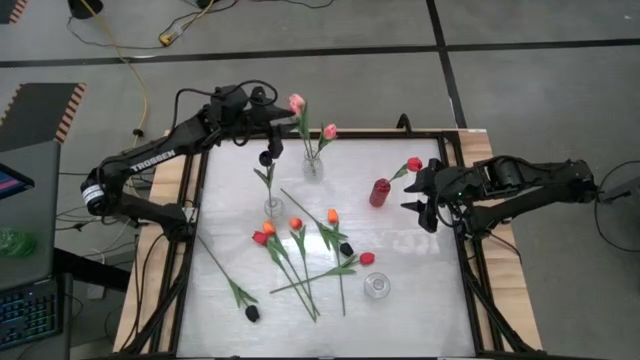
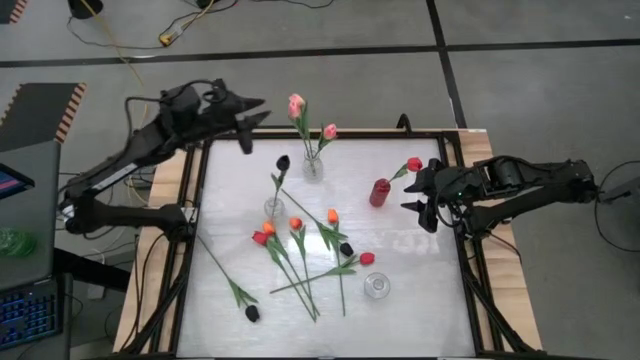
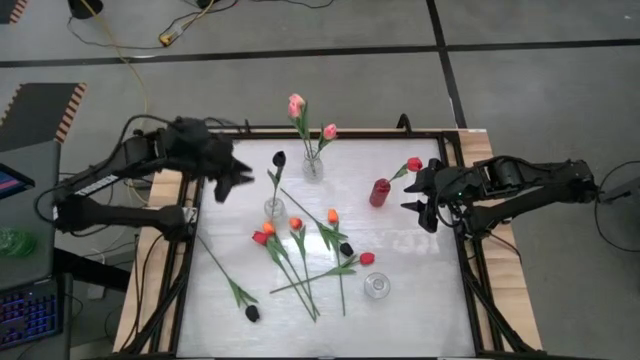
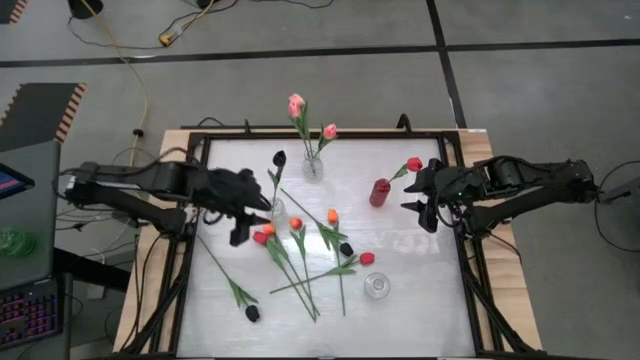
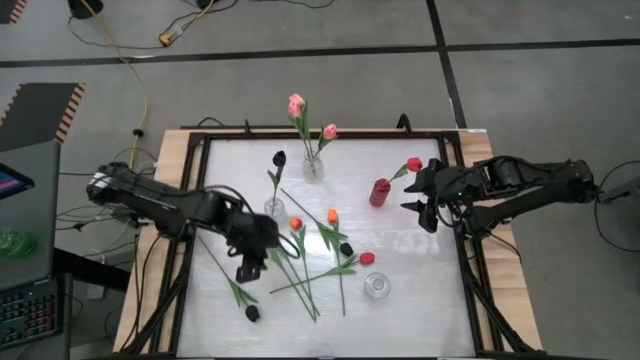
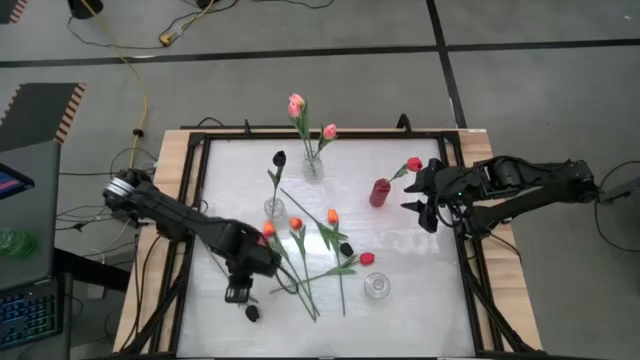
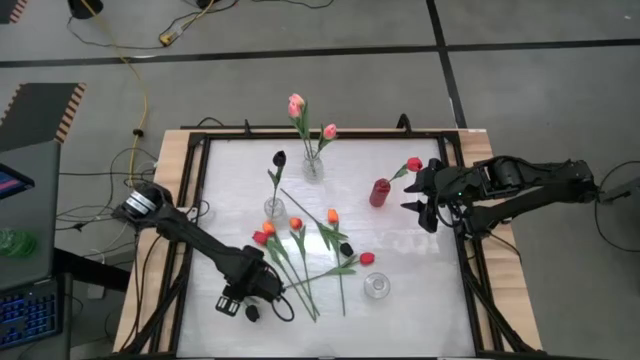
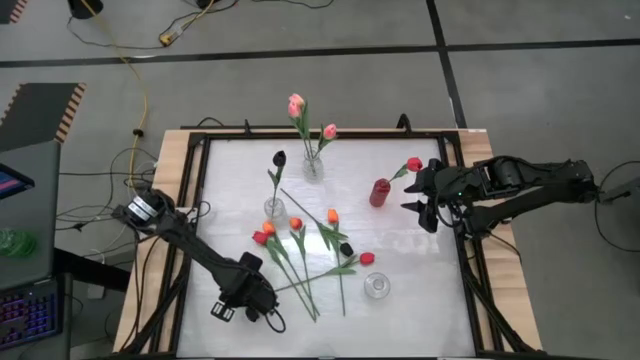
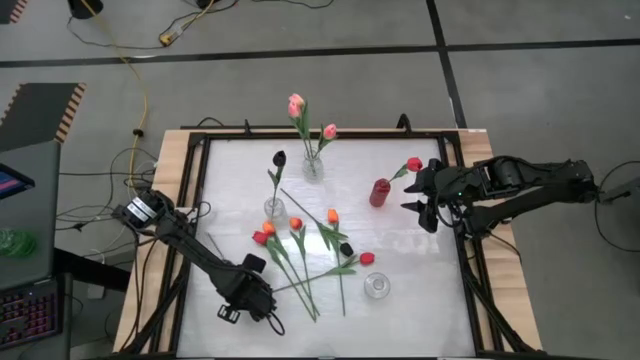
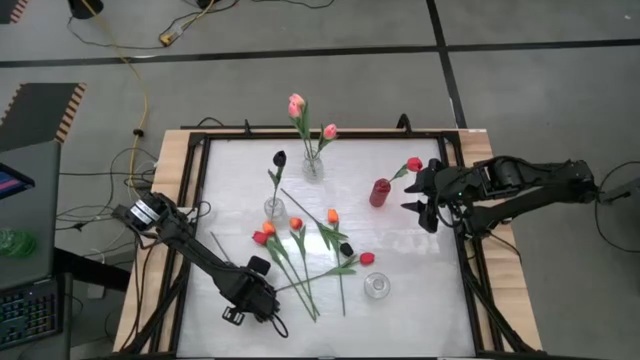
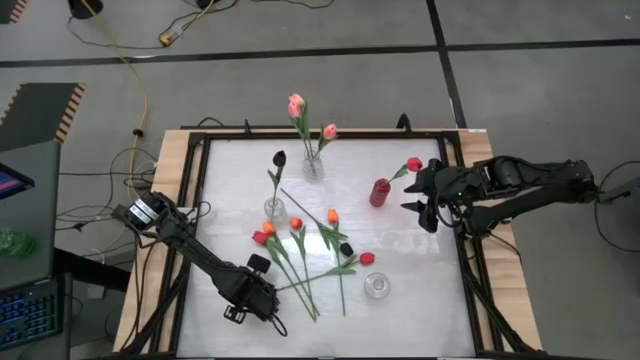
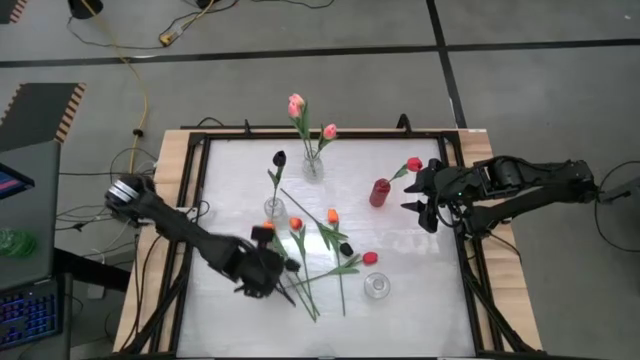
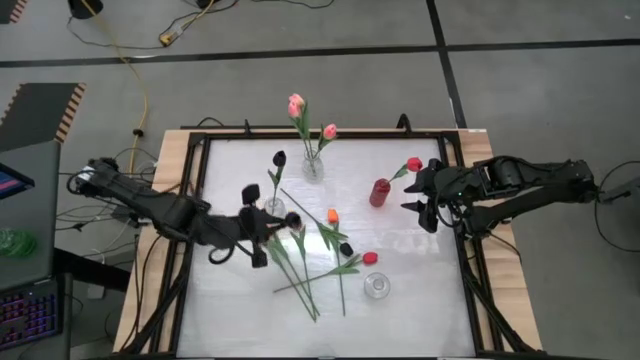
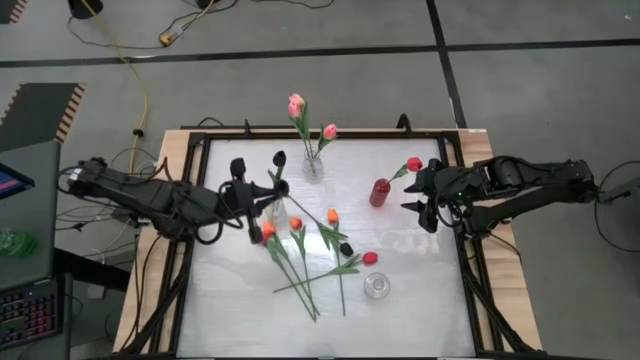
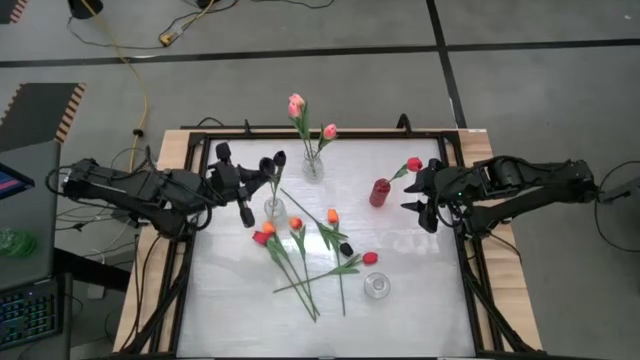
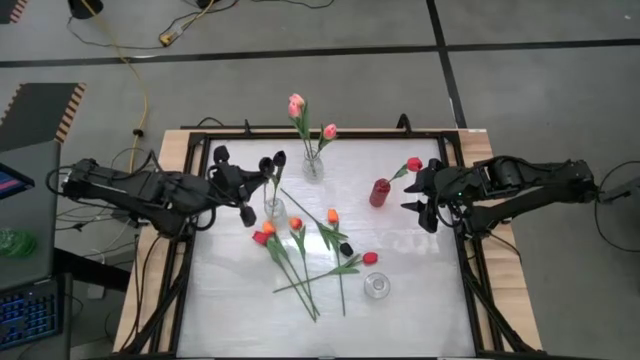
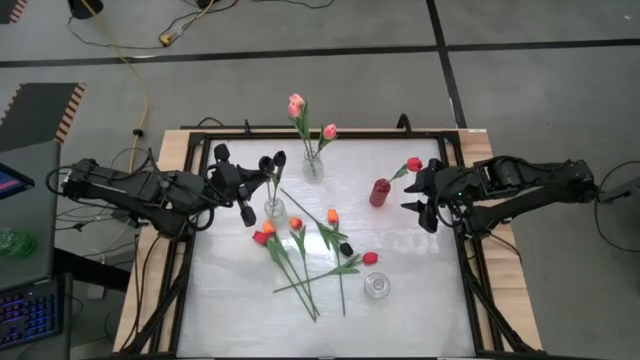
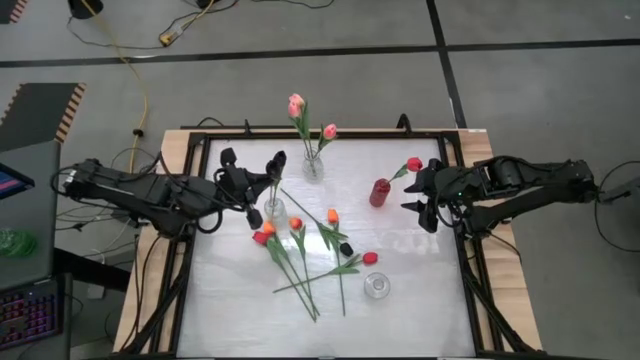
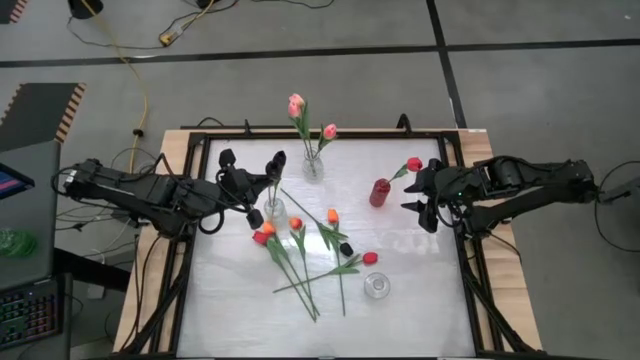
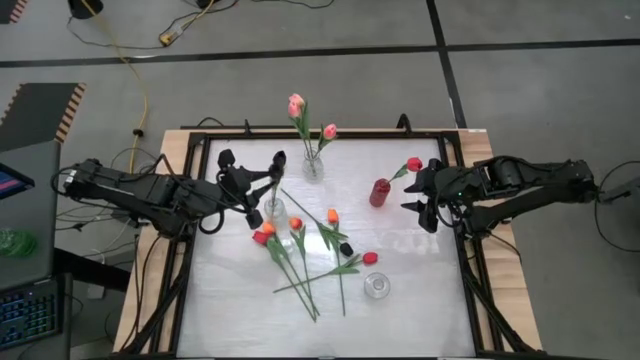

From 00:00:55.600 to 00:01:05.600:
Task: Sort flowers into vase by color
Put the black tulip into the middle transparent vase

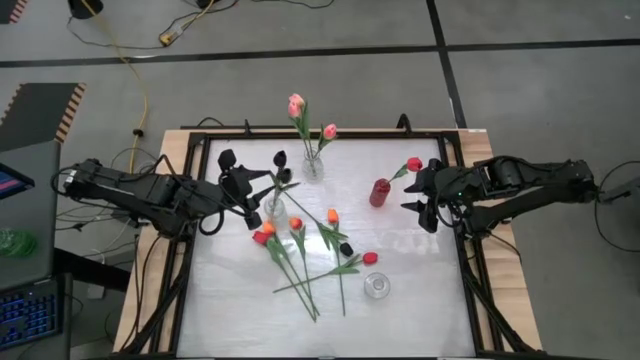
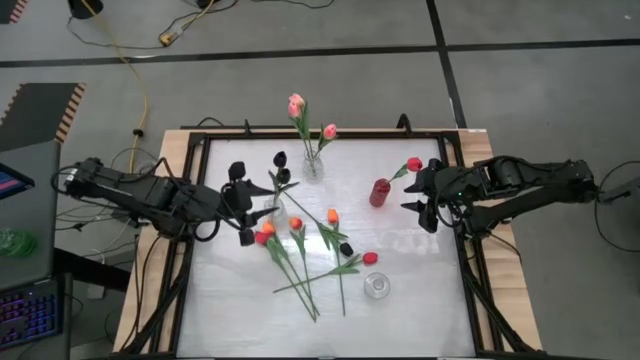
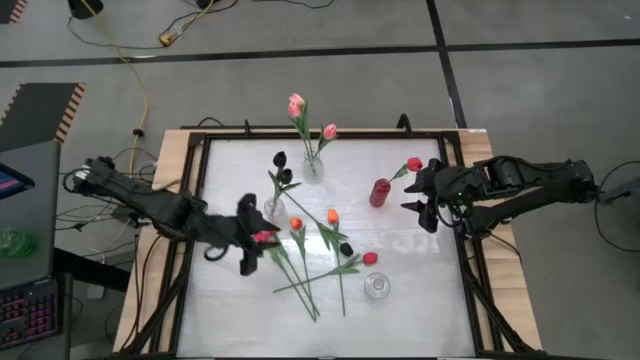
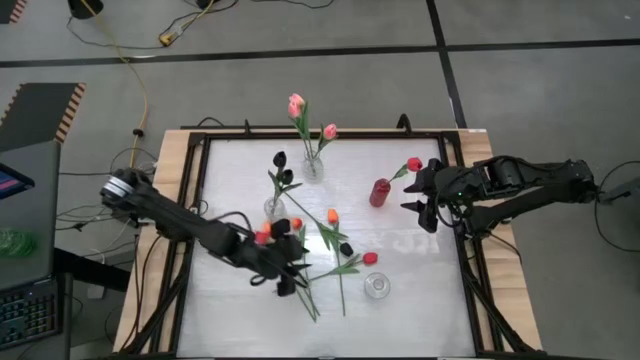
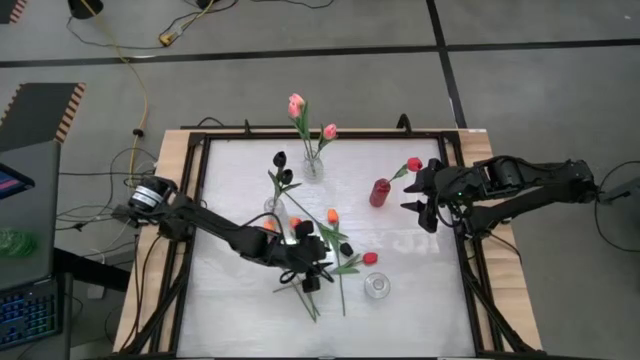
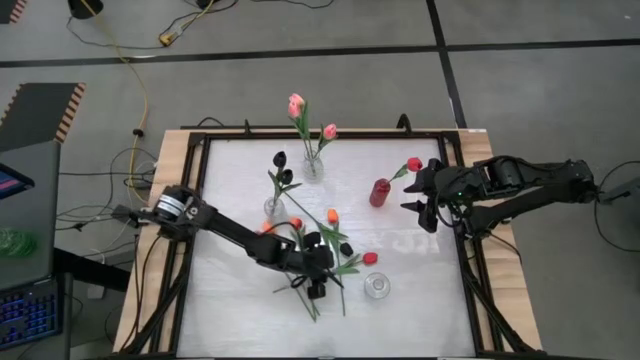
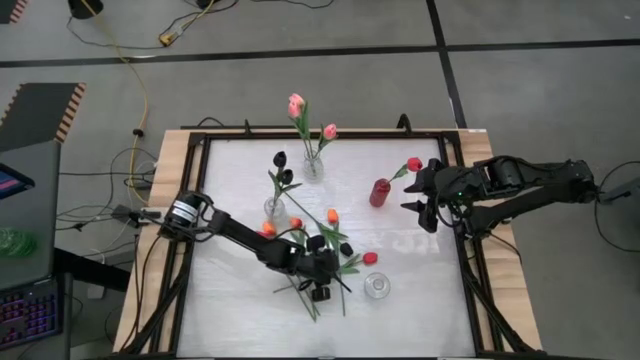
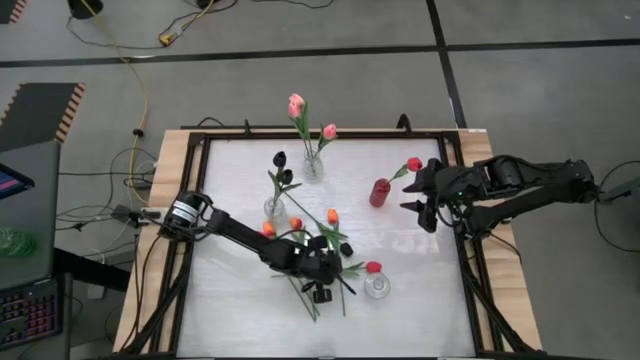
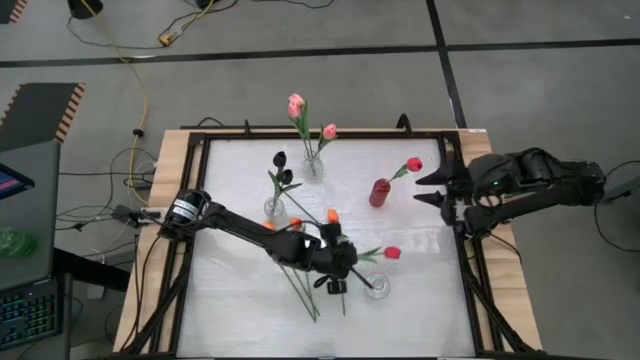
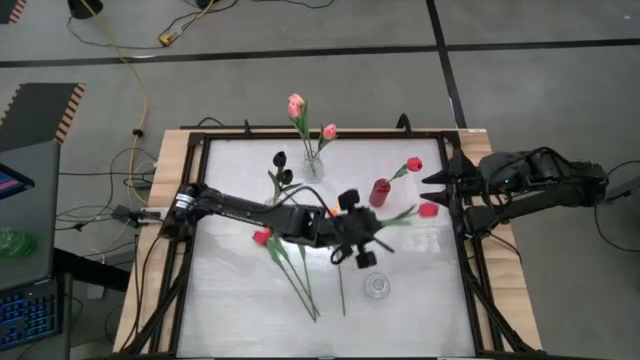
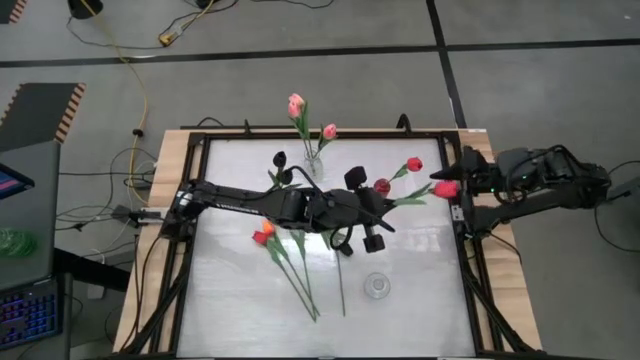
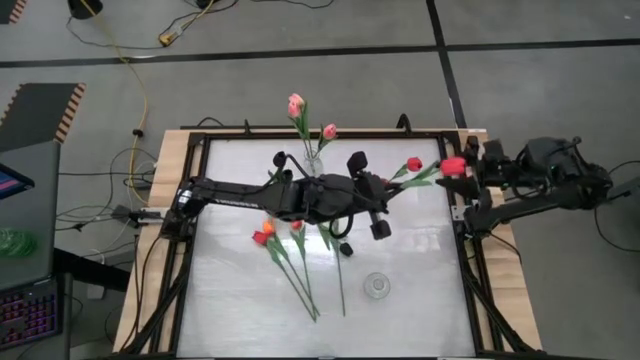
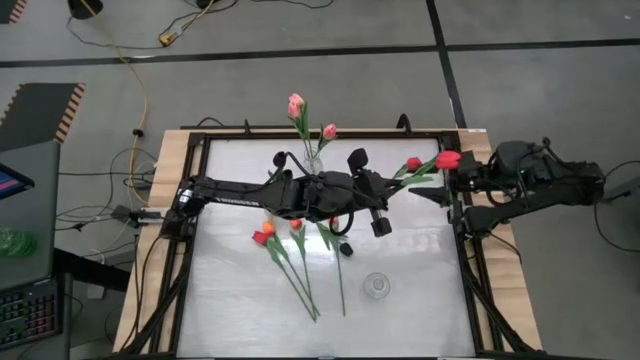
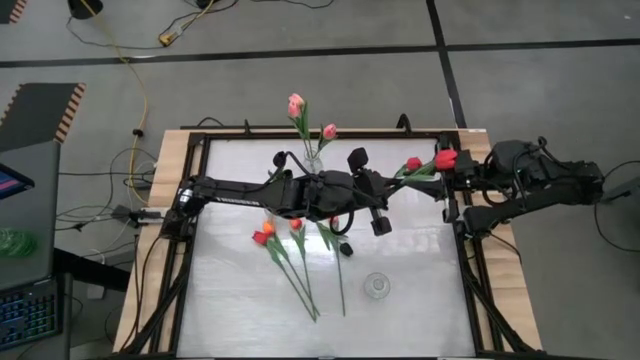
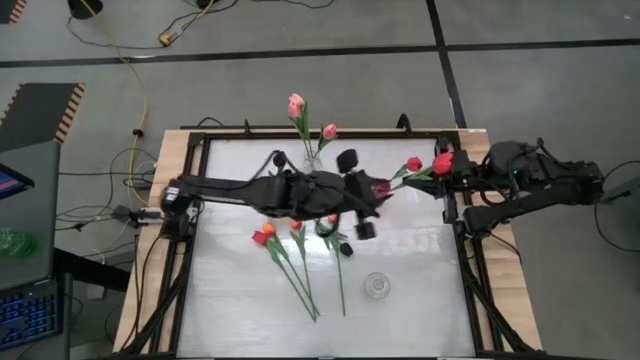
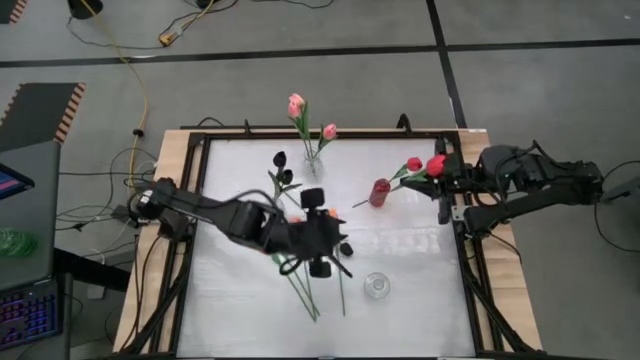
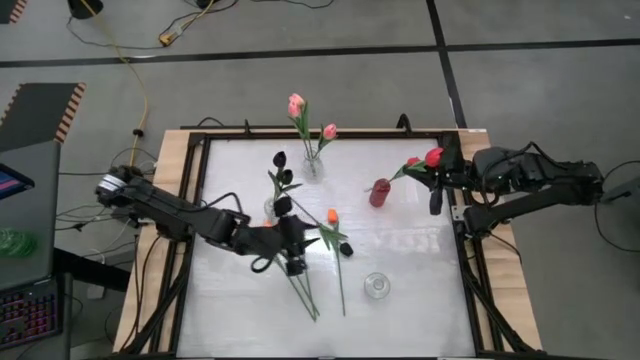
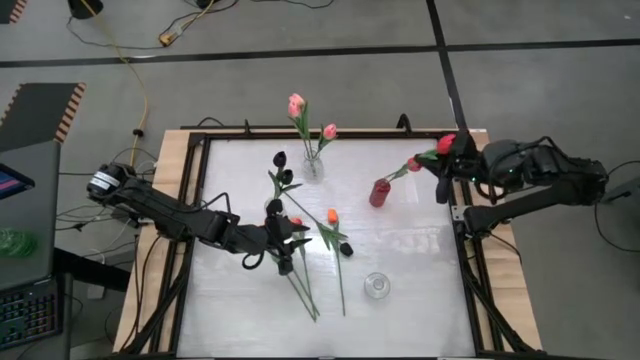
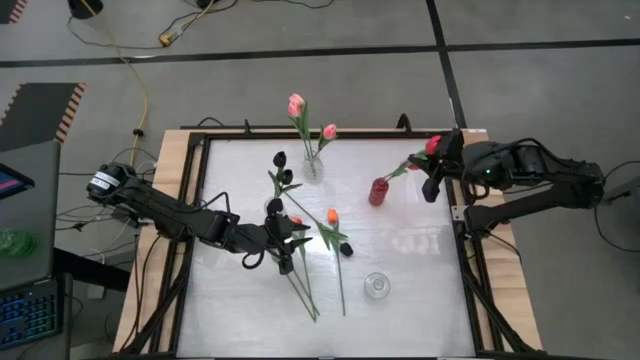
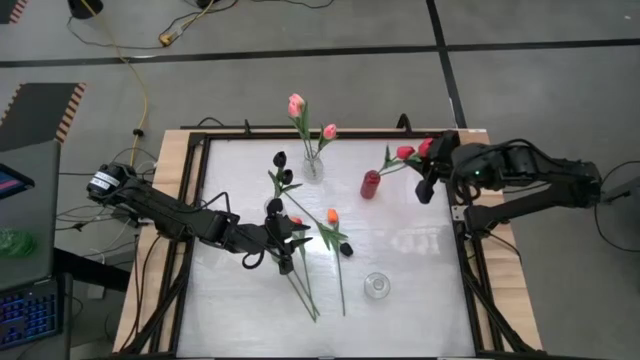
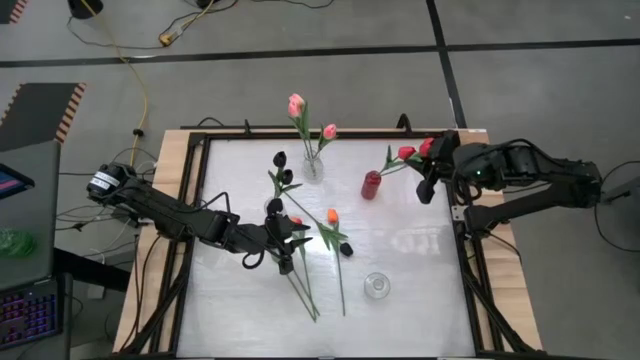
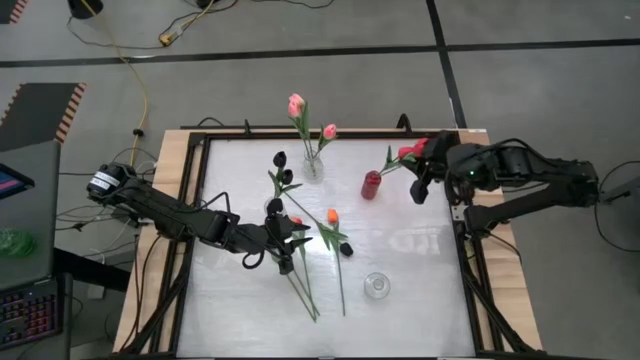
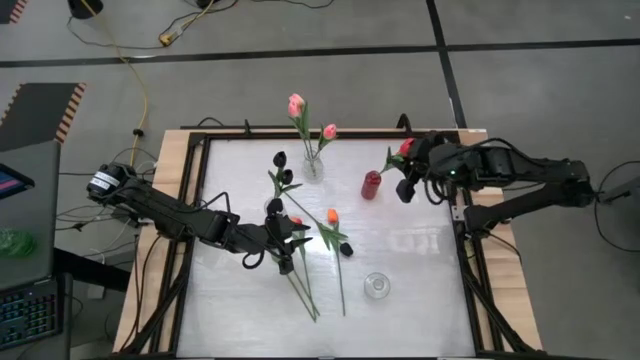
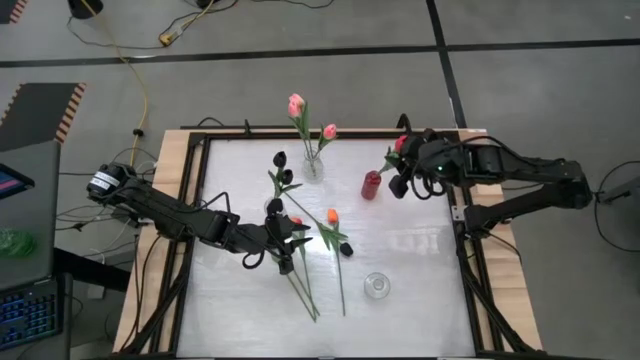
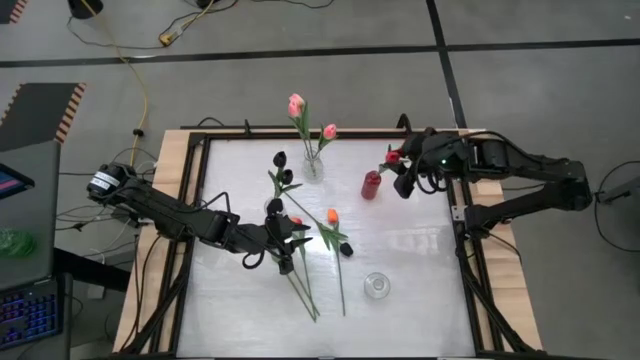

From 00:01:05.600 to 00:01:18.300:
Put the red tulip into the red vase
